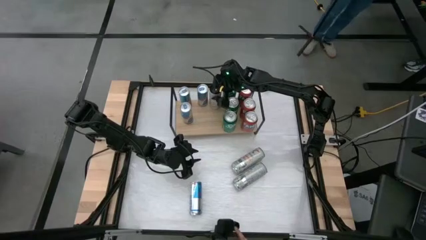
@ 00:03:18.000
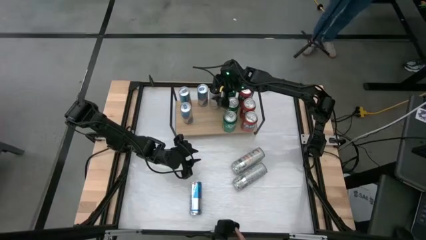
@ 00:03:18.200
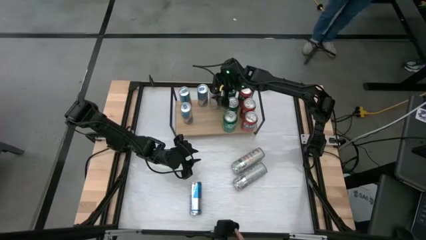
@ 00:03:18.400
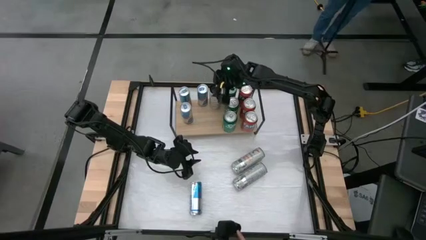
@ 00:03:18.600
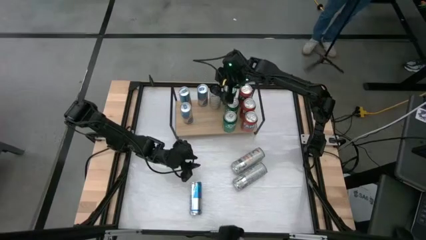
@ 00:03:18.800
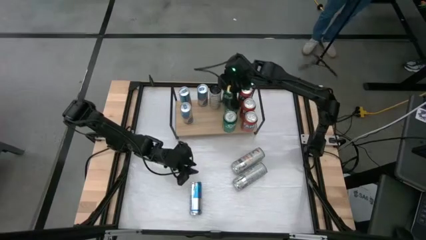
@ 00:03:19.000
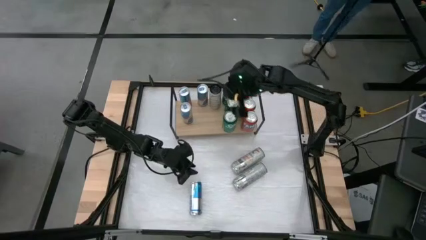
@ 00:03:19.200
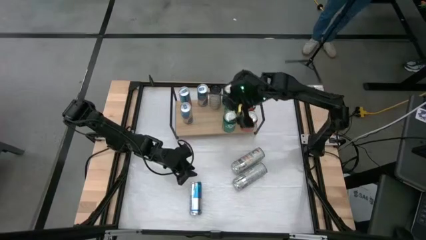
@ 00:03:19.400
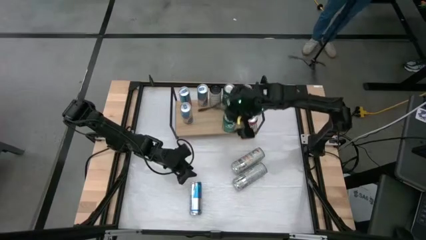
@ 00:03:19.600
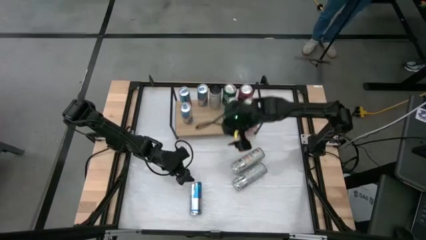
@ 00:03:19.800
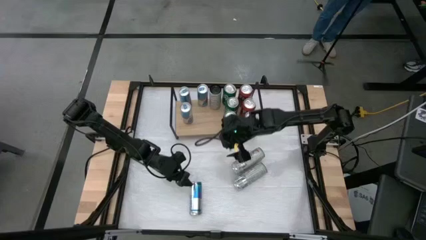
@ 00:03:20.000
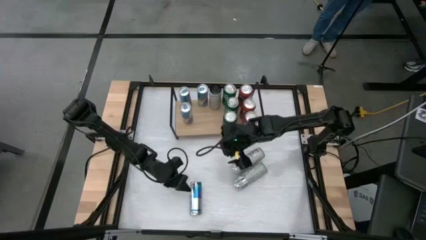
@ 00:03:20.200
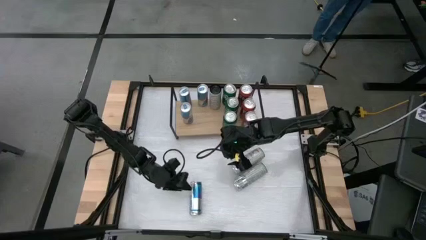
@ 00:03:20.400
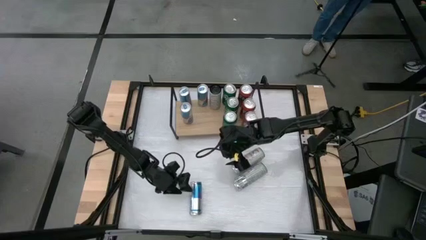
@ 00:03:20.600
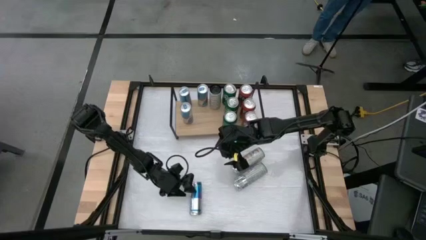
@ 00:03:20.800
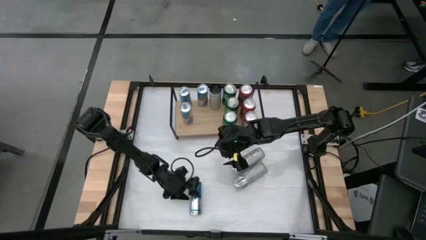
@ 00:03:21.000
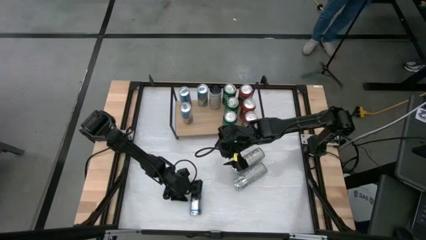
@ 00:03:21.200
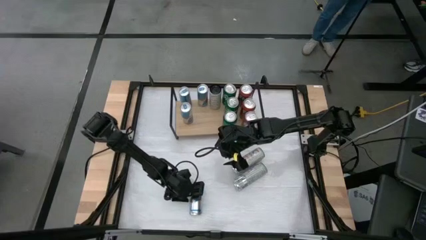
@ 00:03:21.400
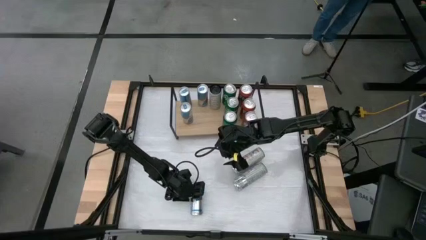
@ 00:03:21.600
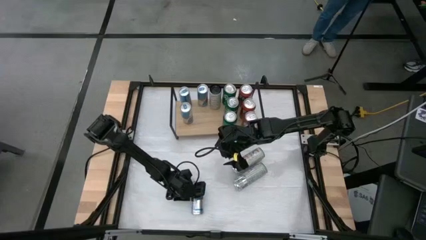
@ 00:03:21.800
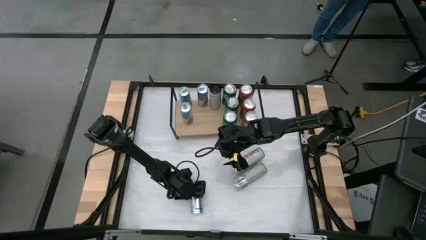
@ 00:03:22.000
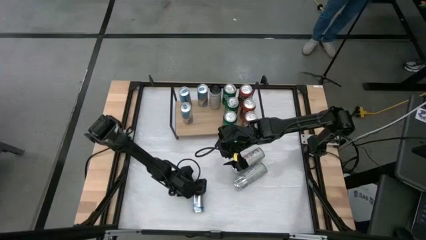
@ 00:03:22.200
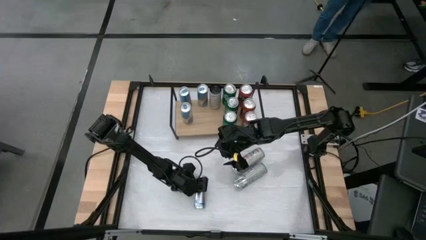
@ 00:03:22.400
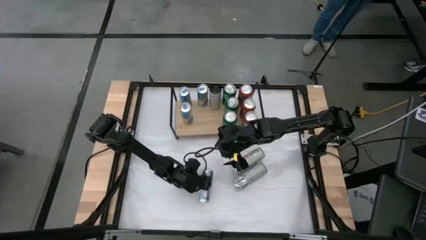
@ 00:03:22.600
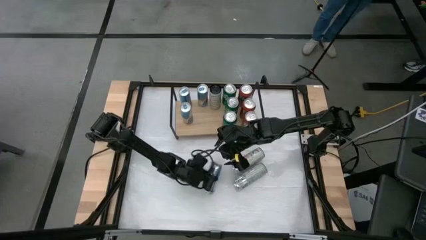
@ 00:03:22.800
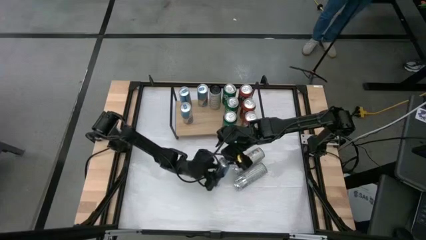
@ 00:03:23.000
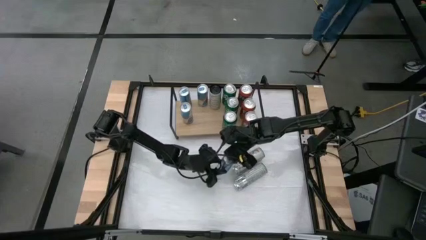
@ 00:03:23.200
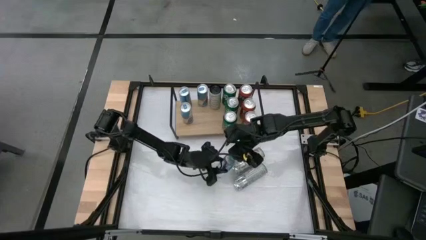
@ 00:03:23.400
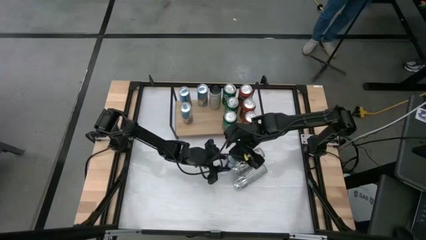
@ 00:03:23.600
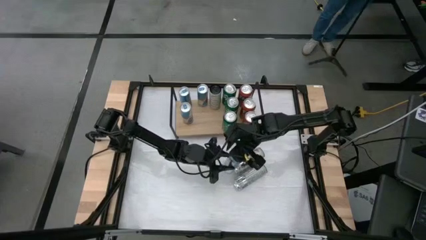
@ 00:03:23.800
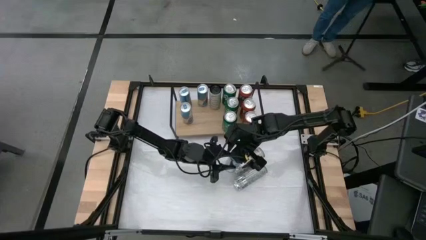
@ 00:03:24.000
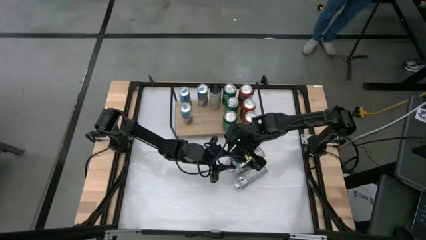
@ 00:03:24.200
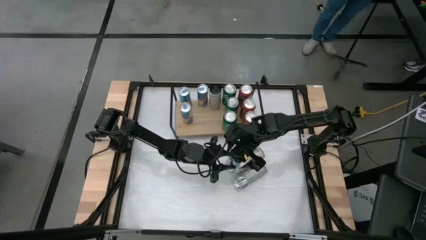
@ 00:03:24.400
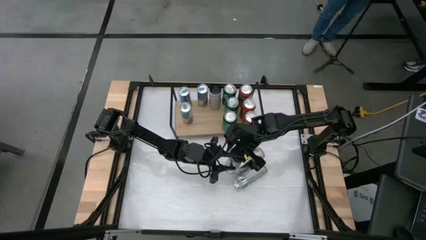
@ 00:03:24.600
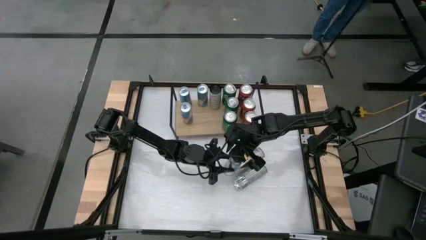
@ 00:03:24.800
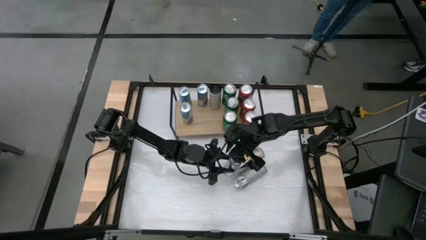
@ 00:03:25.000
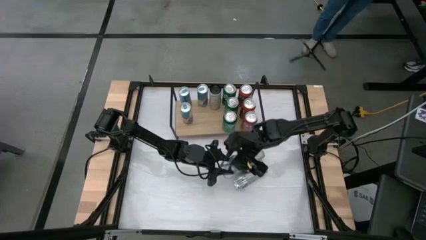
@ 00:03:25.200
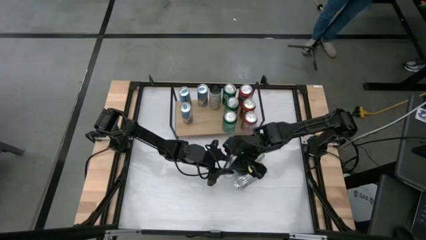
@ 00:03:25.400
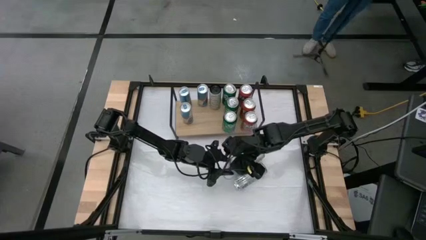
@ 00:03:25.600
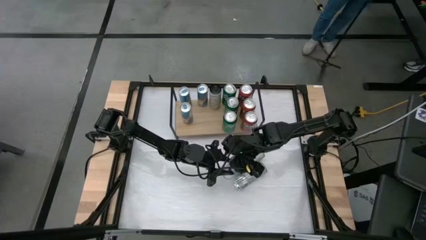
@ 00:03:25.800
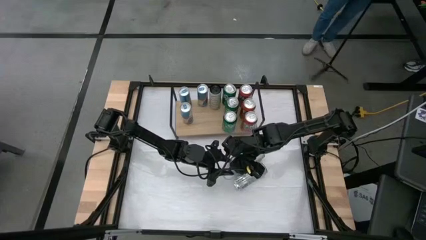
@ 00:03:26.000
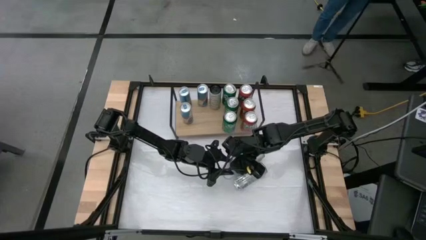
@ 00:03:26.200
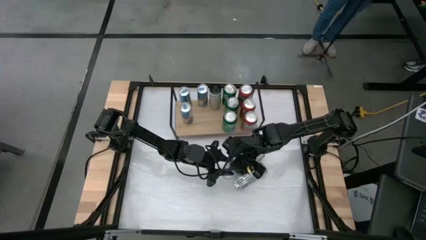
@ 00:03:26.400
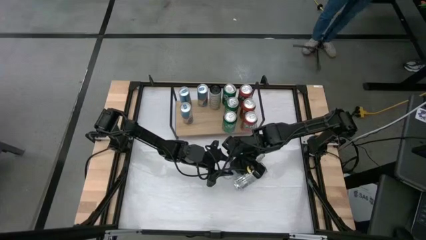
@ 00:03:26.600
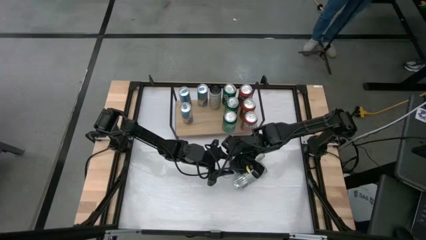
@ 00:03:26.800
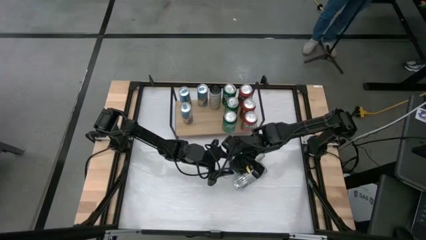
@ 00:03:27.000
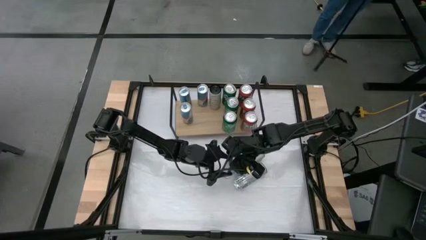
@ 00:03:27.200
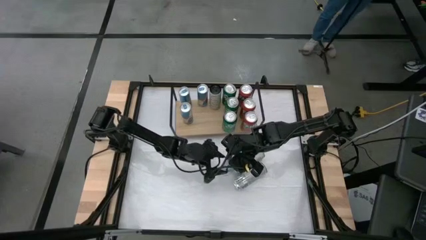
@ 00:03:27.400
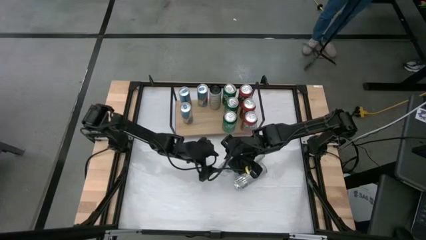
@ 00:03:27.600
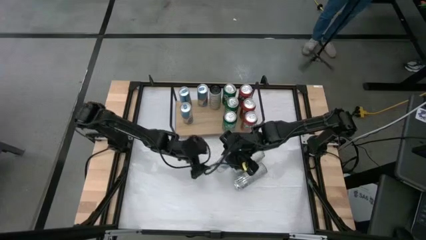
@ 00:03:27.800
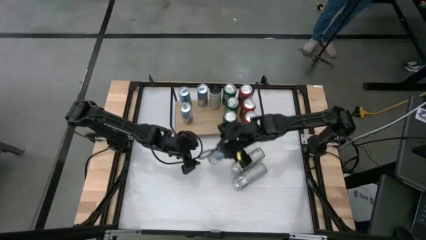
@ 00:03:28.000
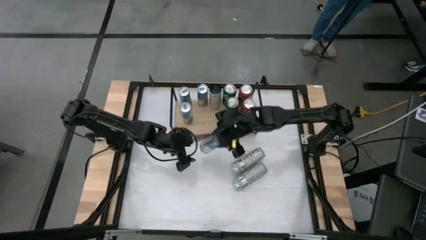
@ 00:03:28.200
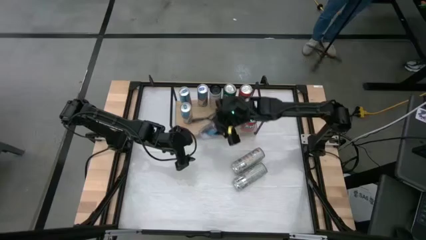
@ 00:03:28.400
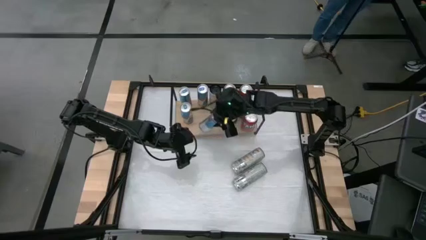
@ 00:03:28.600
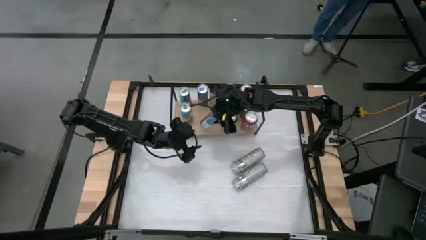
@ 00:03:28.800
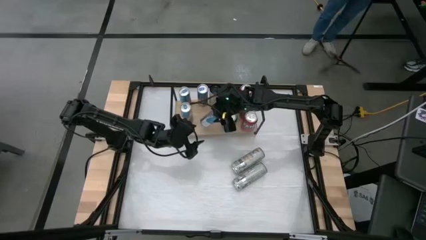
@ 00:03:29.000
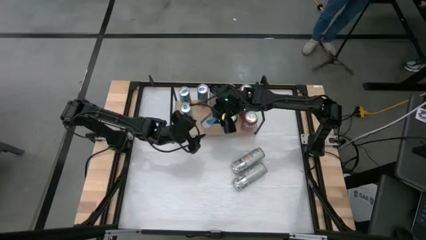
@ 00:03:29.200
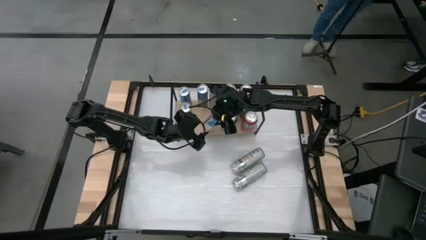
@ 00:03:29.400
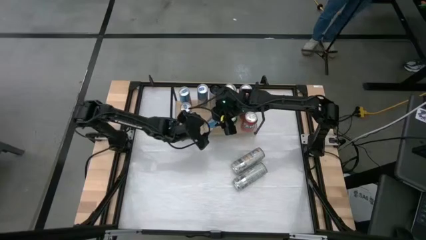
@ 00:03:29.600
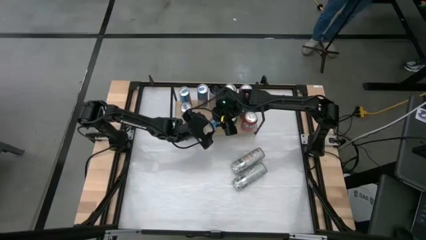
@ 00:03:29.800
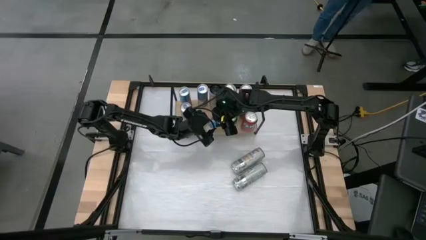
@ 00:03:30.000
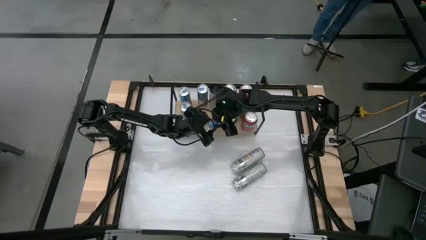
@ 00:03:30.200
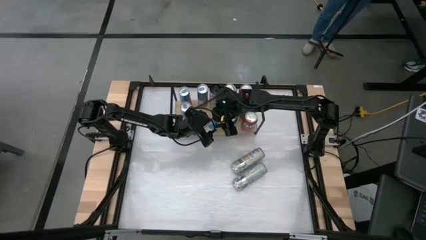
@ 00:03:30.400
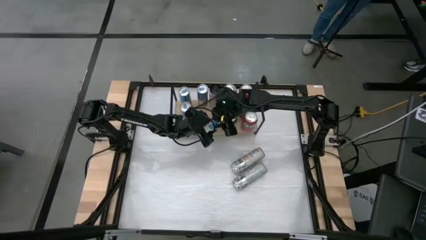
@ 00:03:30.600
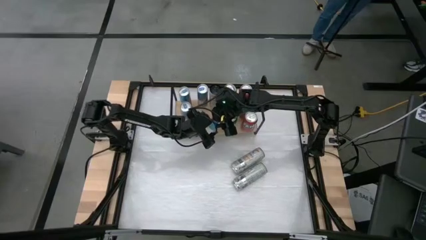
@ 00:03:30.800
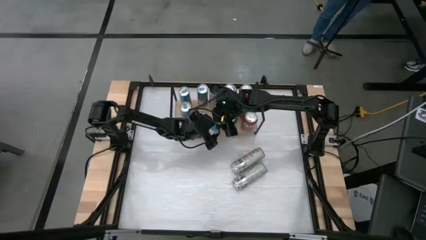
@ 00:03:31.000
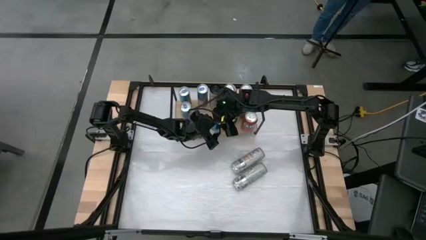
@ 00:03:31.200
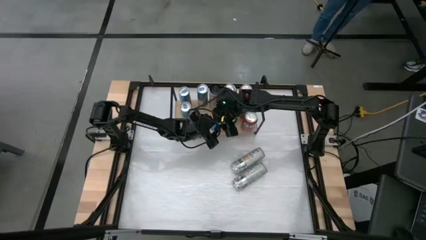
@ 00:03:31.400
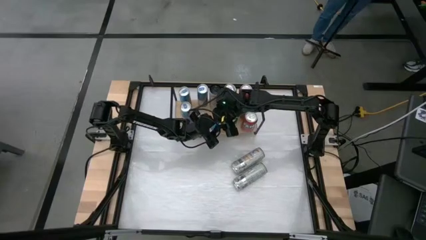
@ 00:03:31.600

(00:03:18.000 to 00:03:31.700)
Task: Sort soda cans
Put the blue soda can on the shelf and align with the other blue soda can
